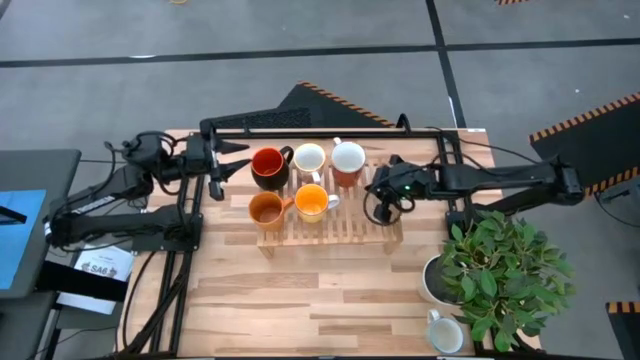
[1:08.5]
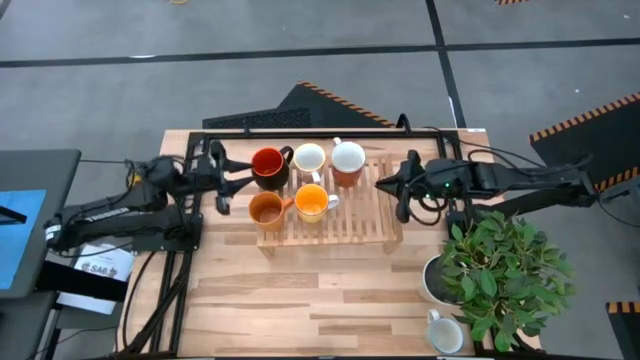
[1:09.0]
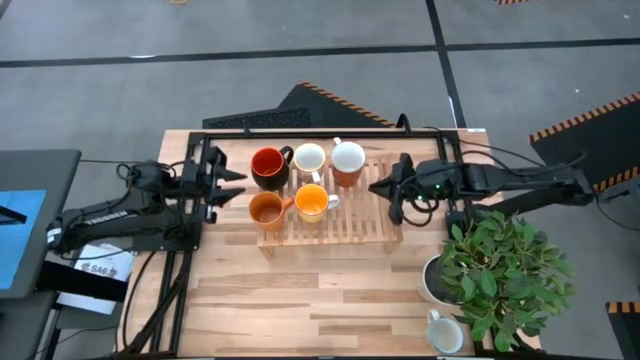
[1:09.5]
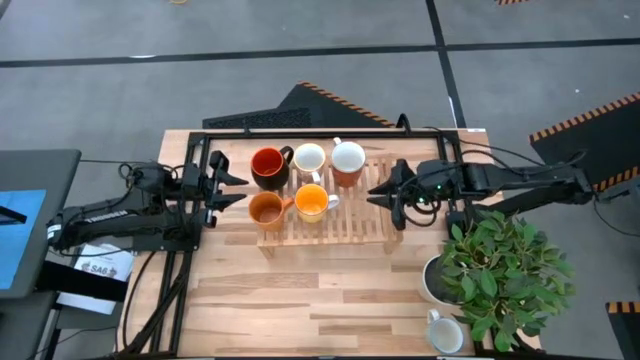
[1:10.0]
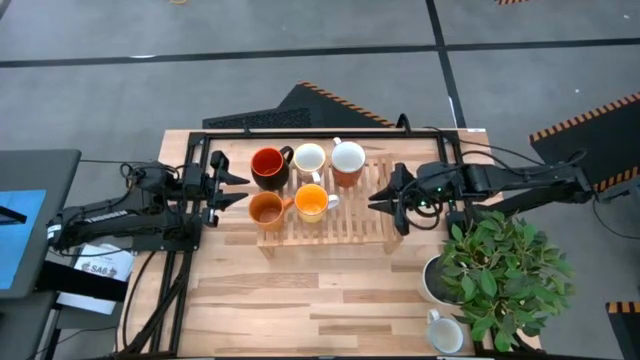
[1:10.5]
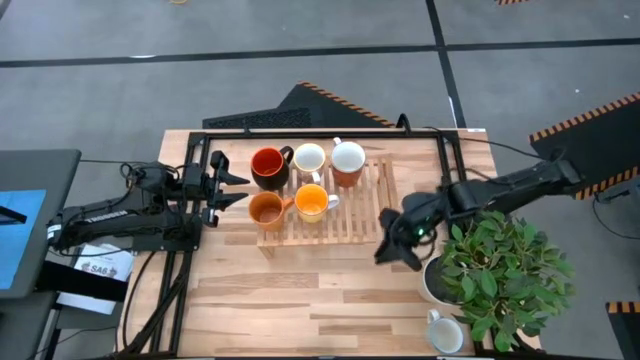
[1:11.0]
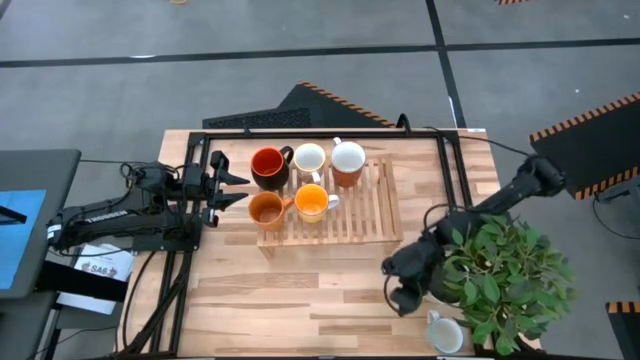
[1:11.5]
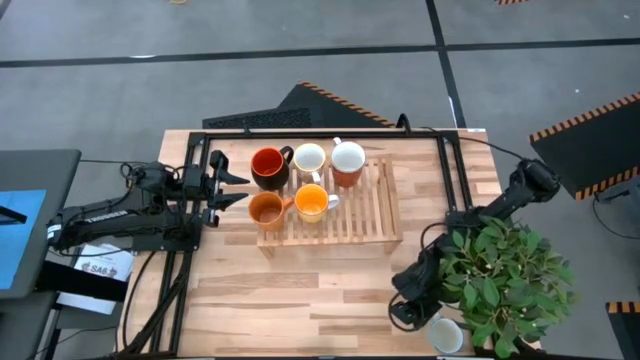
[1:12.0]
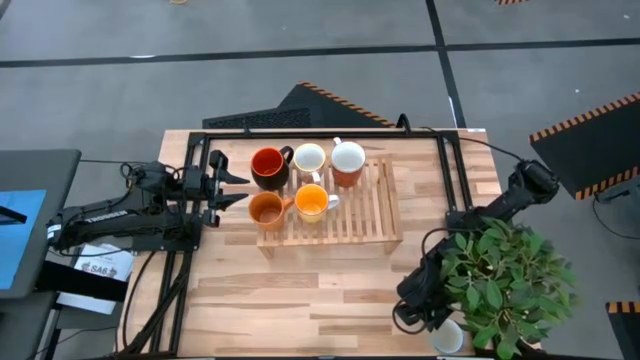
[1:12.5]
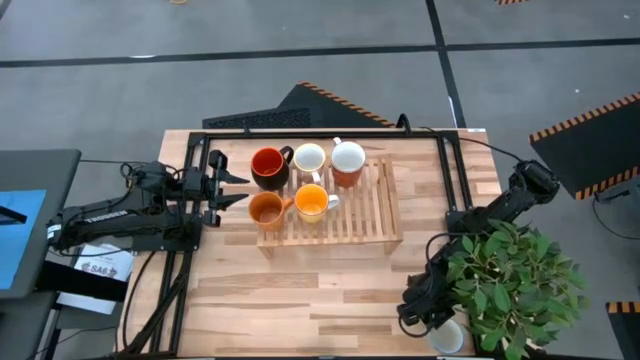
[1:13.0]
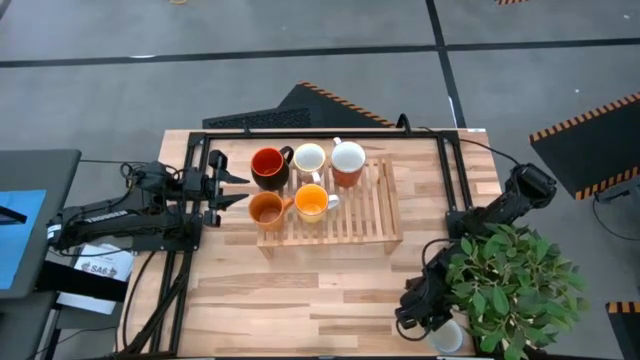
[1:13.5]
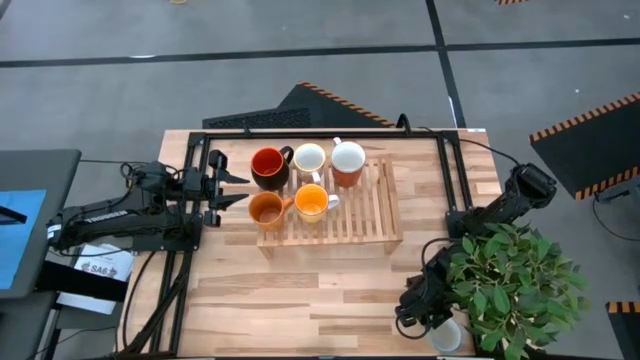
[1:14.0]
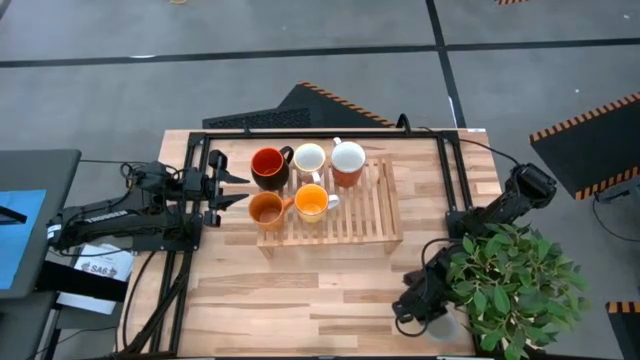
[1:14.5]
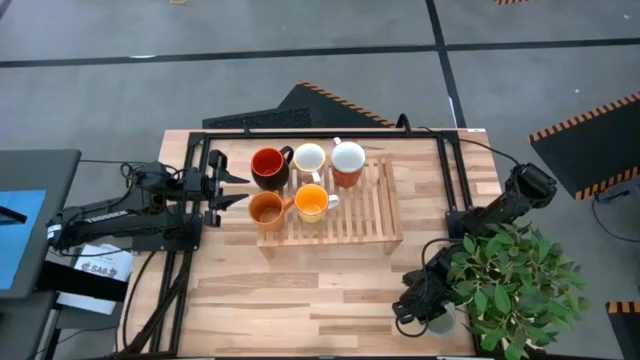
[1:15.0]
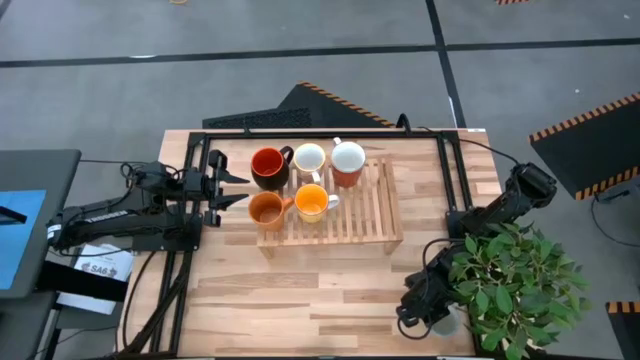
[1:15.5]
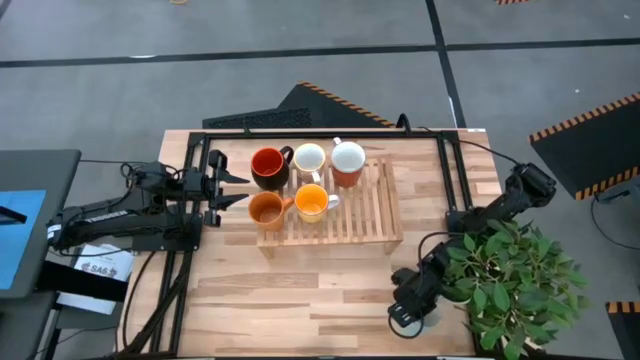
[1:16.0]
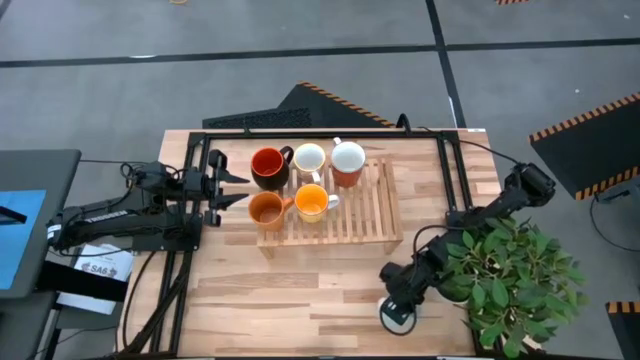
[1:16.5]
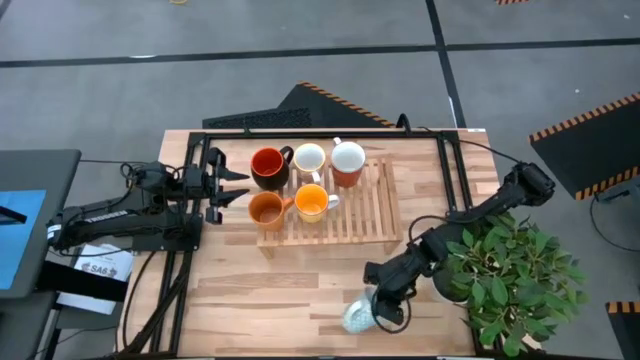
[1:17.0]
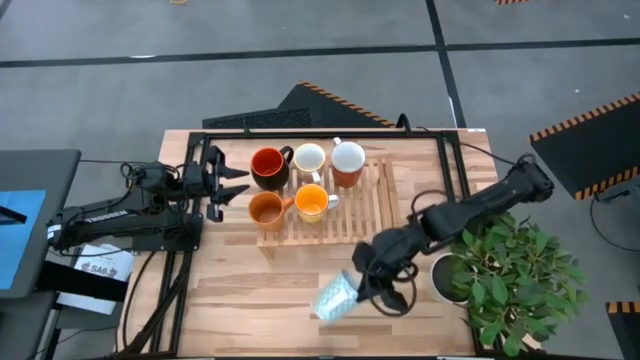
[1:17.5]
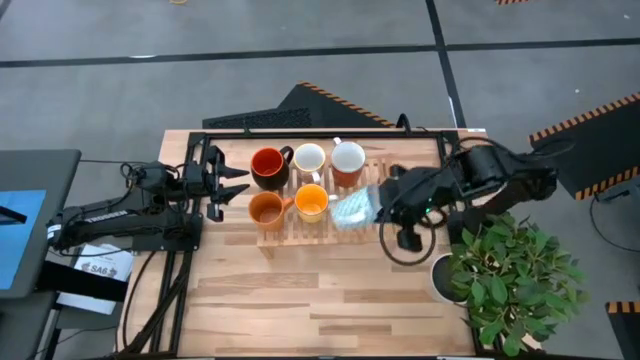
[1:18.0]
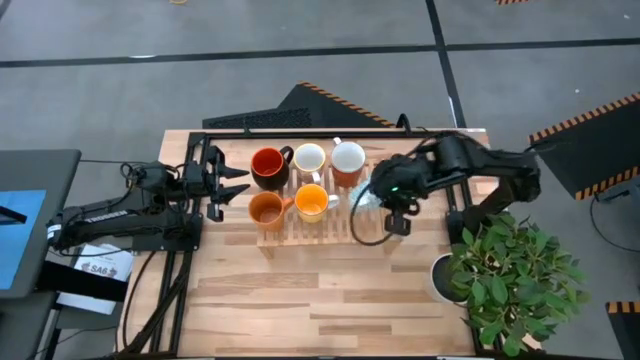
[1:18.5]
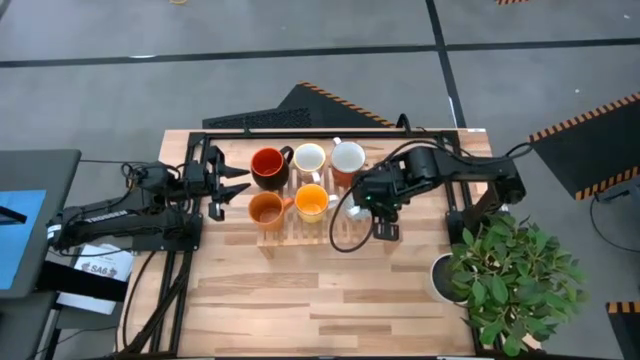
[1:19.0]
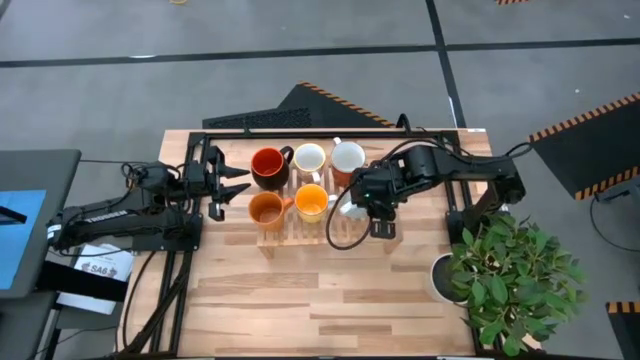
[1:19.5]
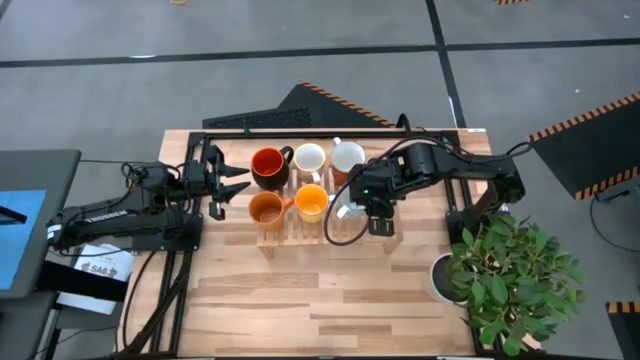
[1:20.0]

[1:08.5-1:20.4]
Task: Place coffee mugs
Put the green patterned mug on the shelf

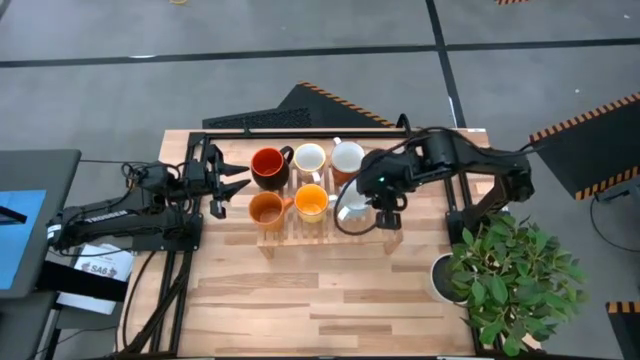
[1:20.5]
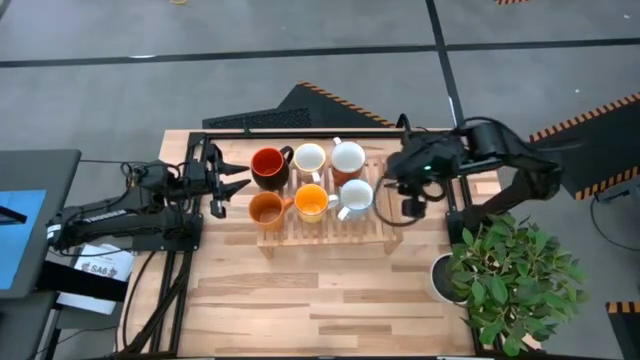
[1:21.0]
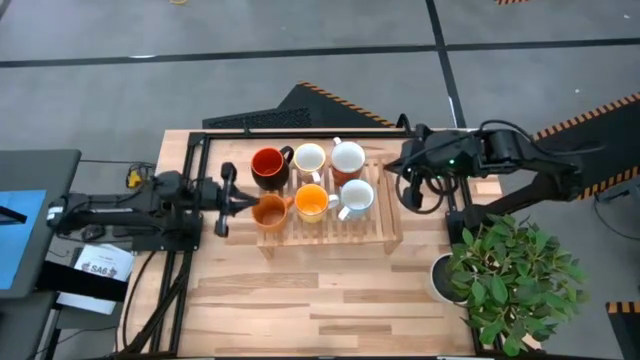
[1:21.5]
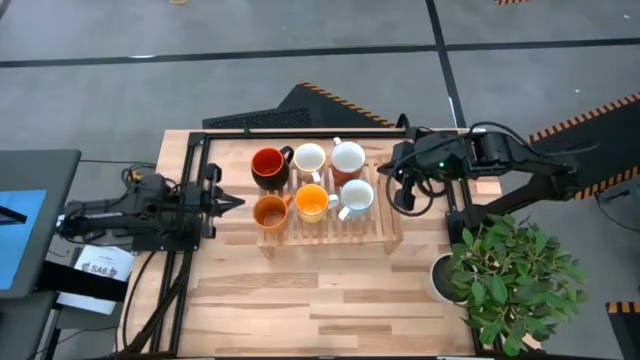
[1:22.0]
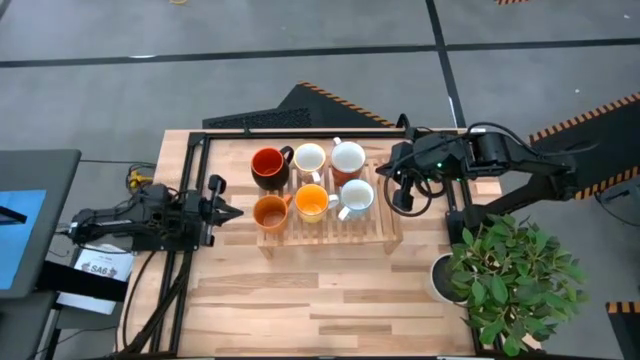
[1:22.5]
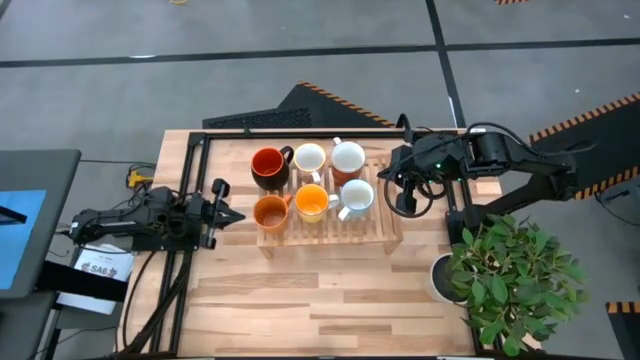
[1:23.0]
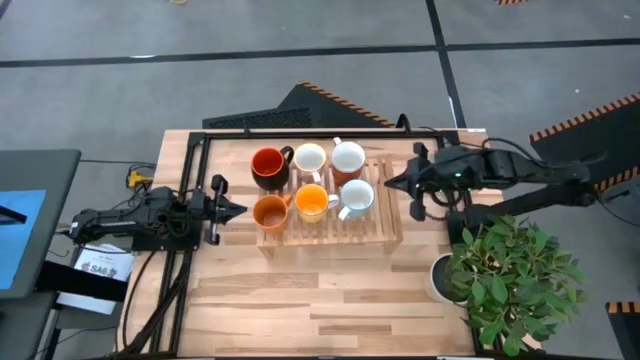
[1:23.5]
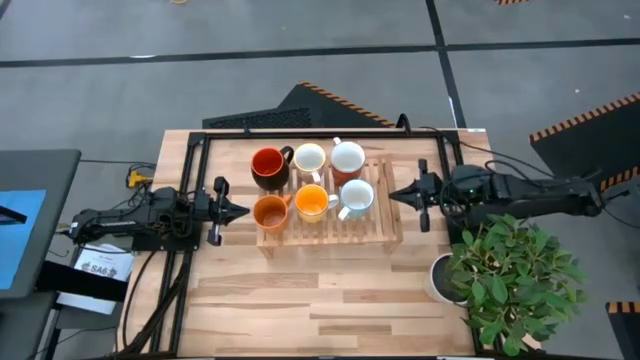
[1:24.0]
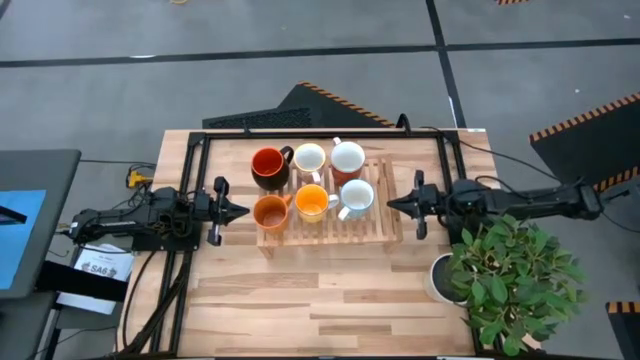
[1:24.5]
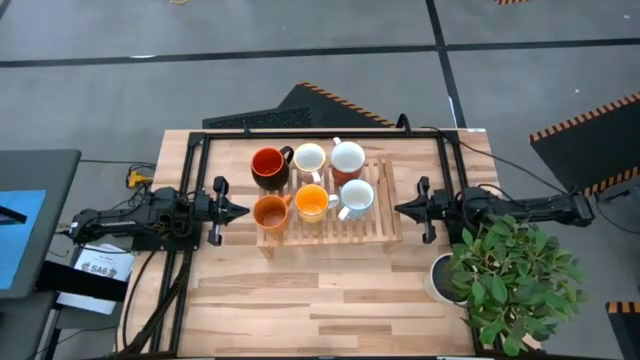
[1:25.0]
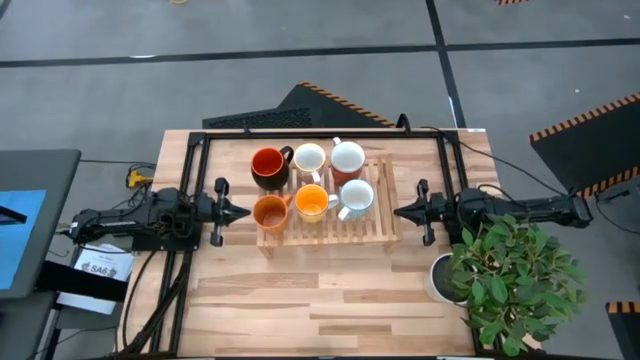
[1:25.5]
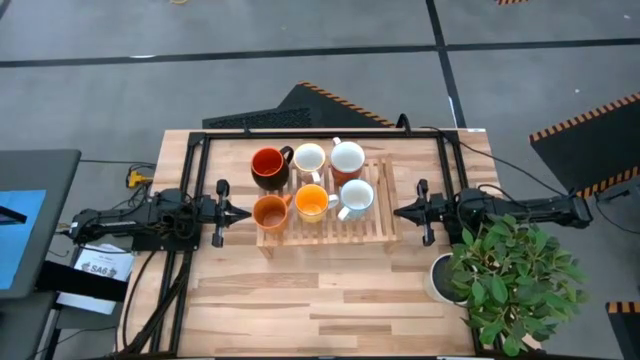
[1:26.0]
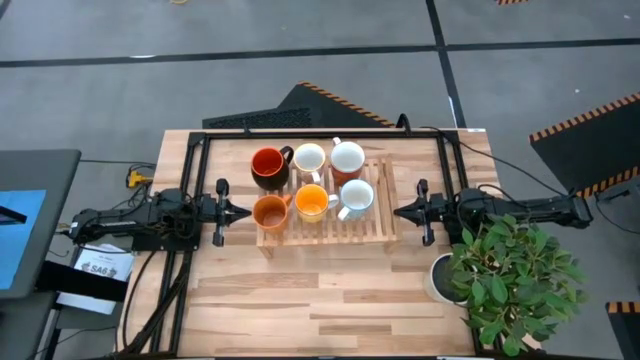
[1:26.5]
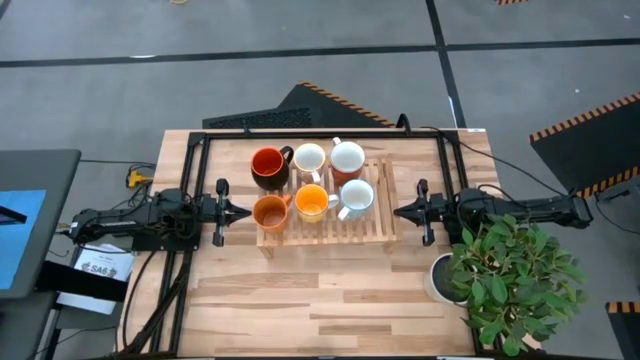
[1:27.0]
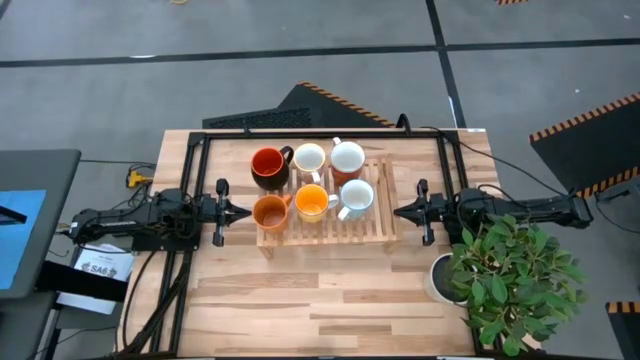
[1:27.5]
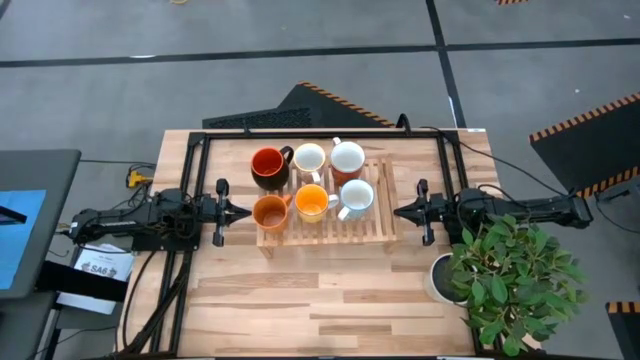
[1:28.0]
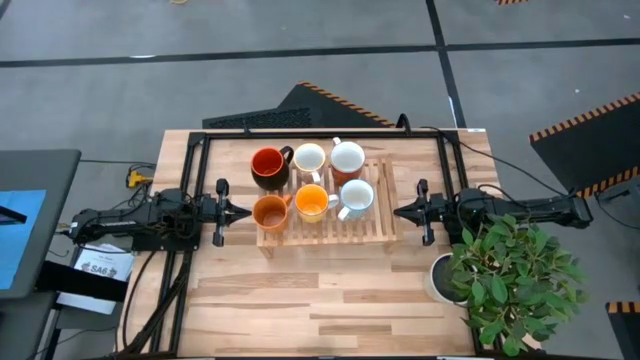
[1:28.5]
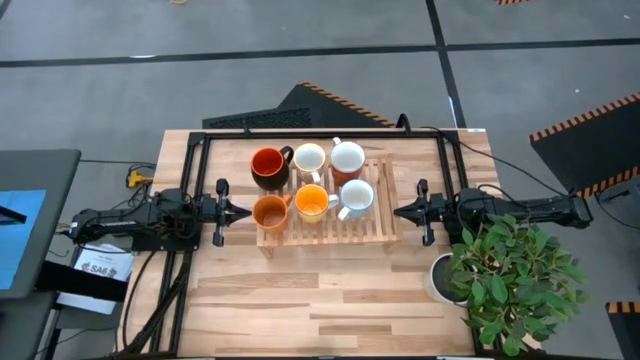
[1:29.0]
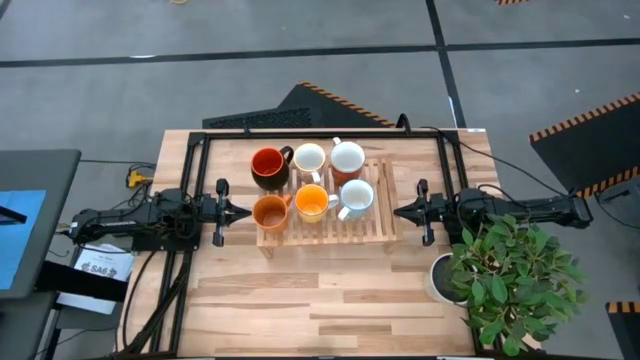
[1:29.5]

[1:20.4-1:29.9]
Return to Home Position
